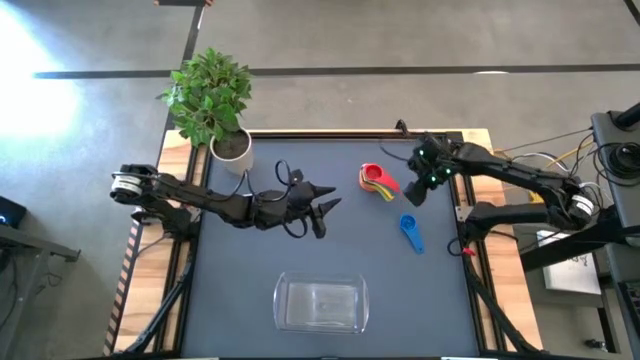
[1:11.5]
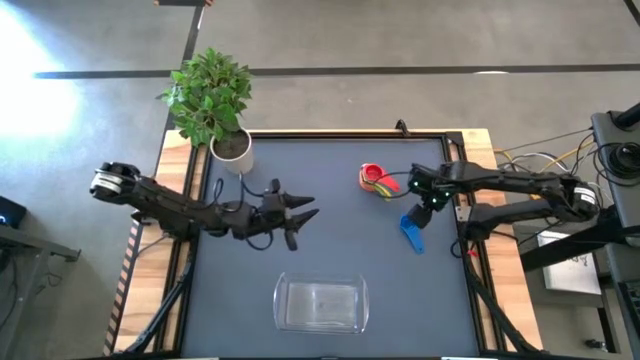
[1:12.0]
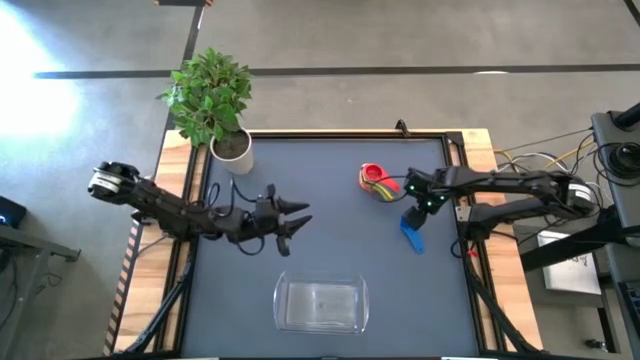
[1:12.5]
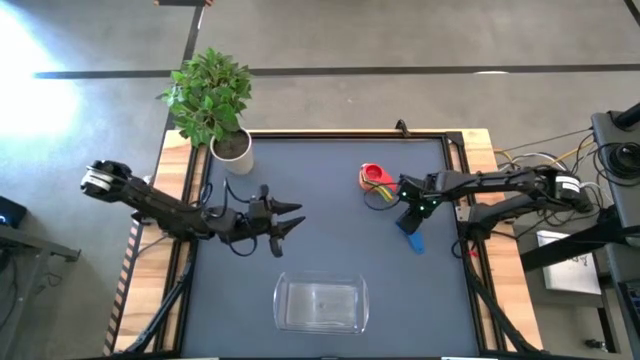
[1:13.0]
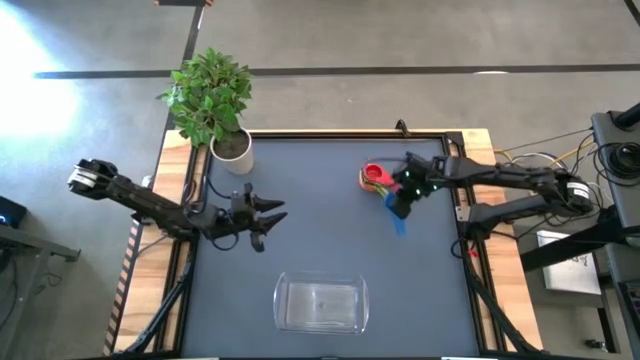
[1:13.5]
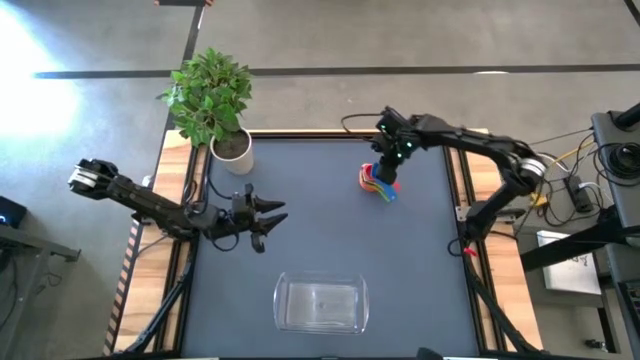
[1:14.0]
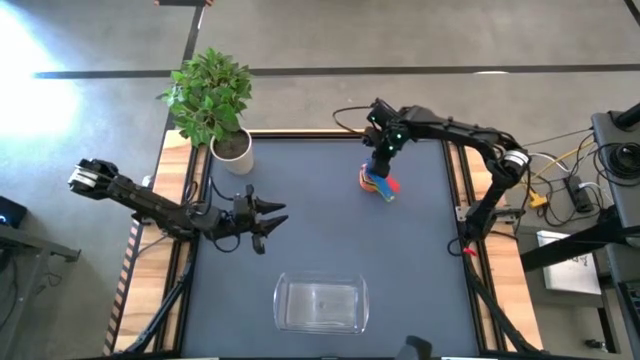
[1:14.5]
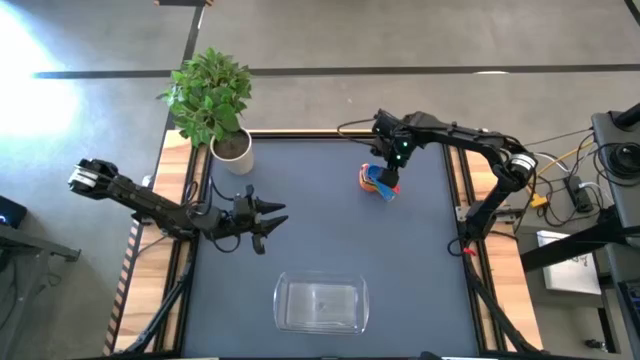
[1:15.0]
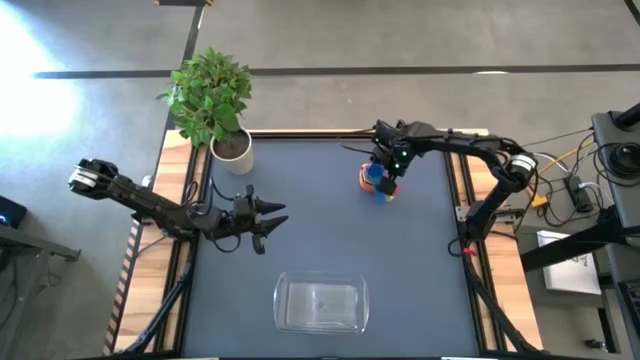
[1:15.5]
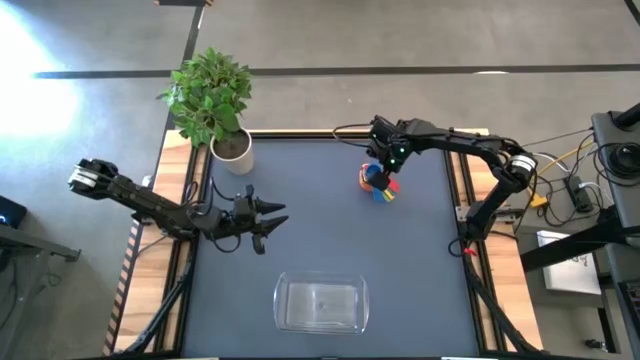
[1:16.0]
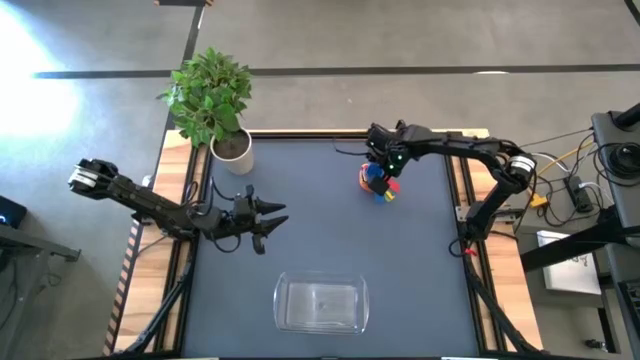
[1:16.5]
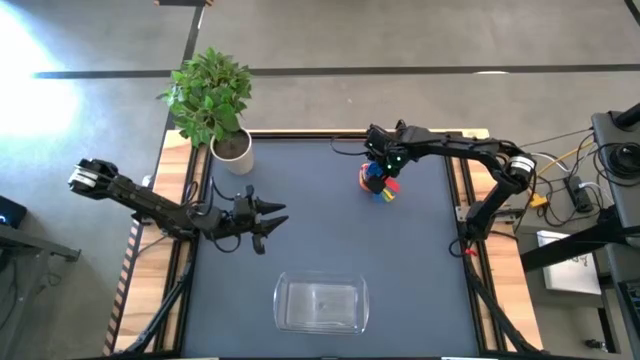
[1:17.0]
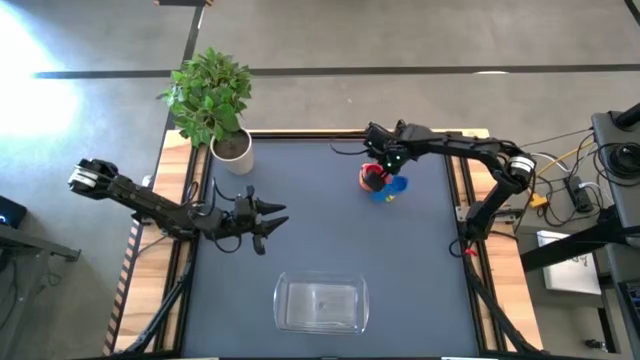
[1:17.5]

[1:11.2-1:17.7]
Task: Nest measuring cups in basket
Stack the blue measuring cup on top of the red measuring cup

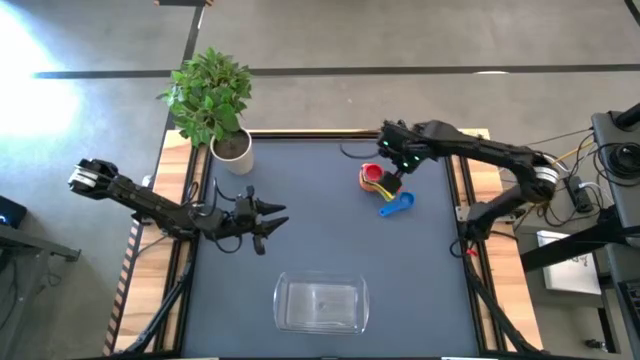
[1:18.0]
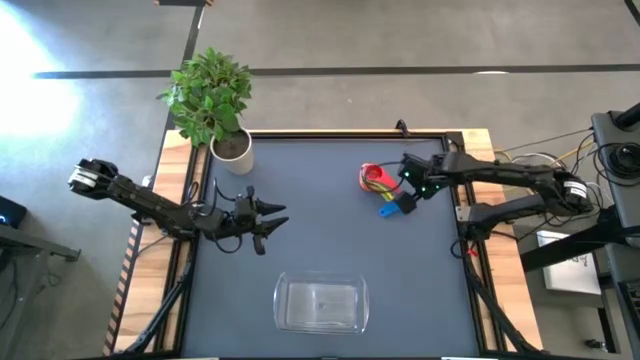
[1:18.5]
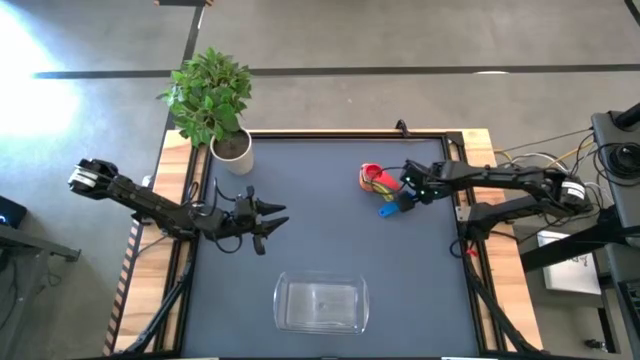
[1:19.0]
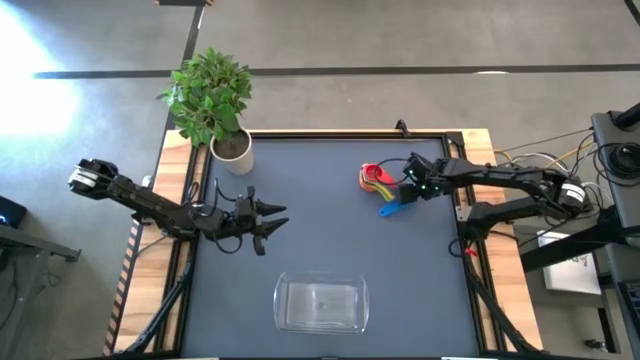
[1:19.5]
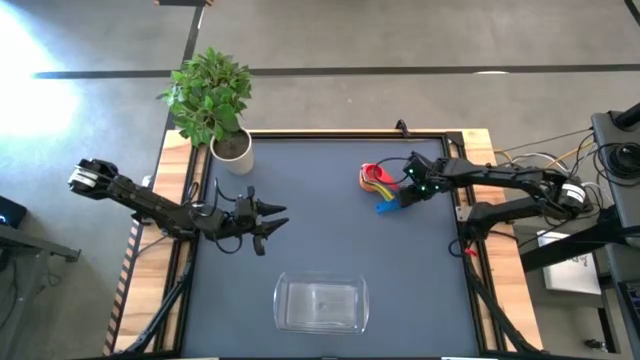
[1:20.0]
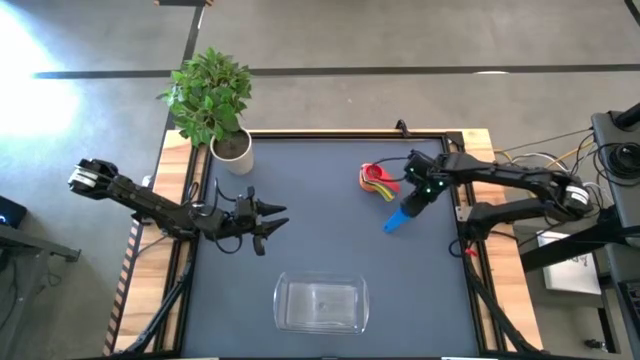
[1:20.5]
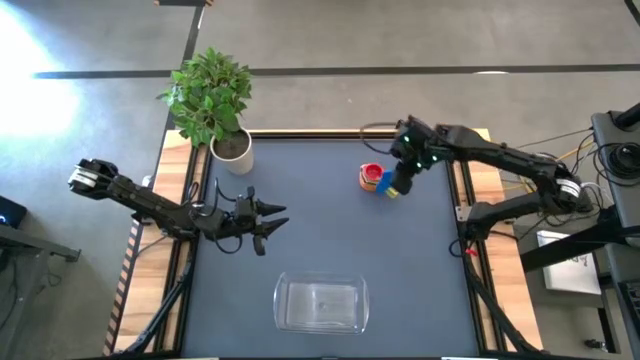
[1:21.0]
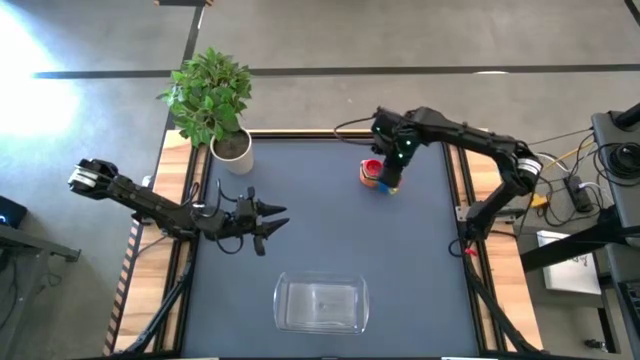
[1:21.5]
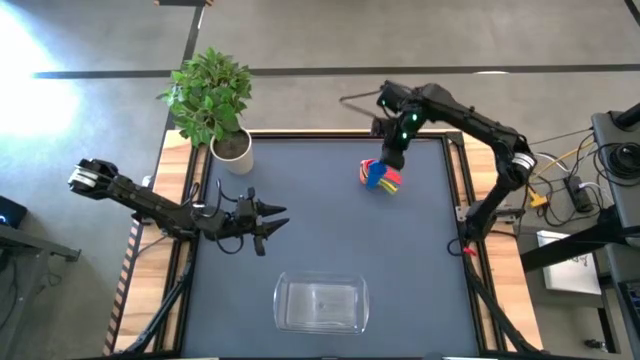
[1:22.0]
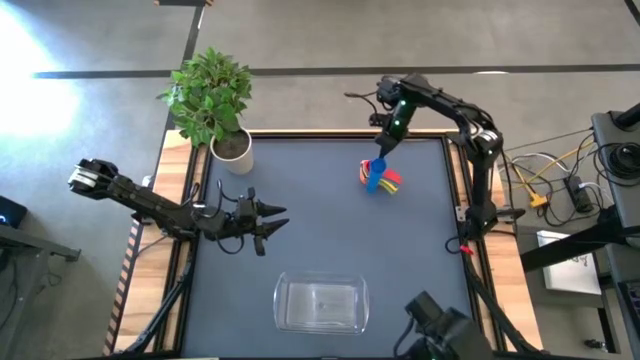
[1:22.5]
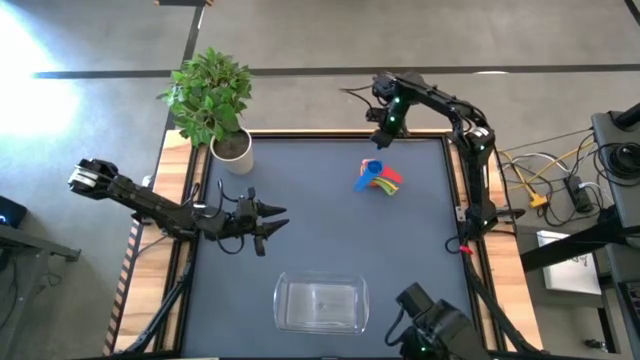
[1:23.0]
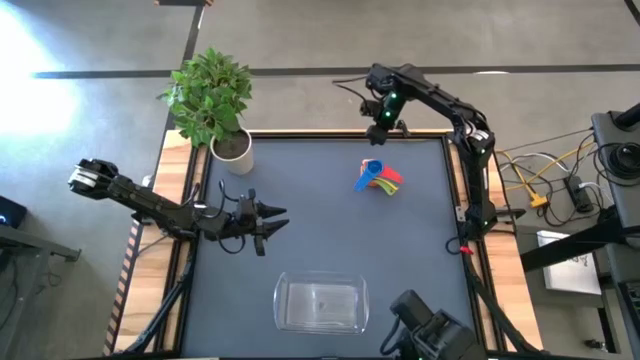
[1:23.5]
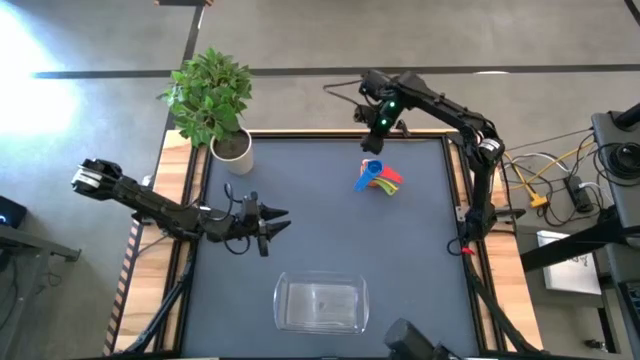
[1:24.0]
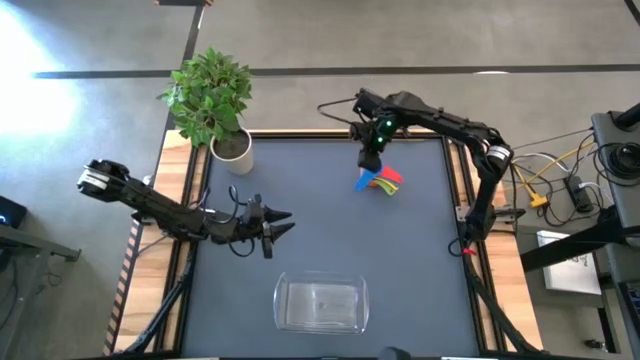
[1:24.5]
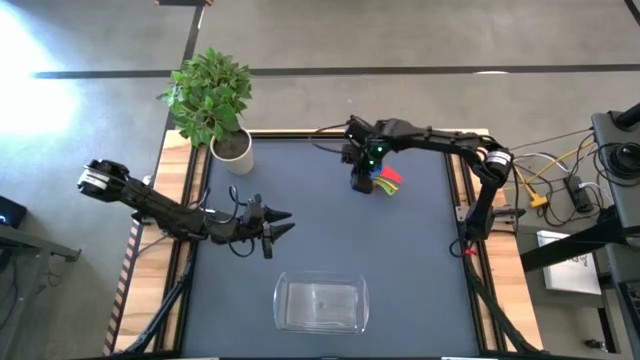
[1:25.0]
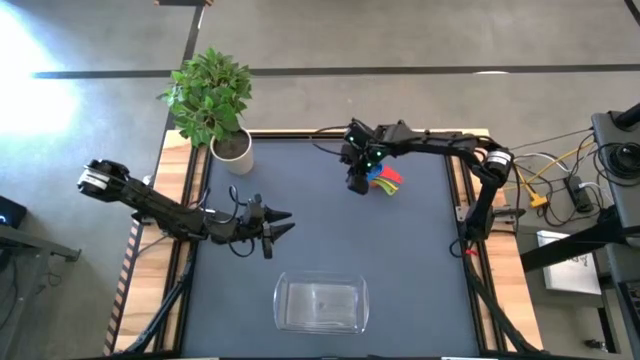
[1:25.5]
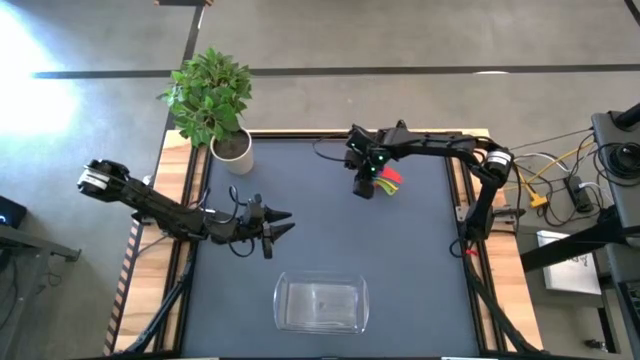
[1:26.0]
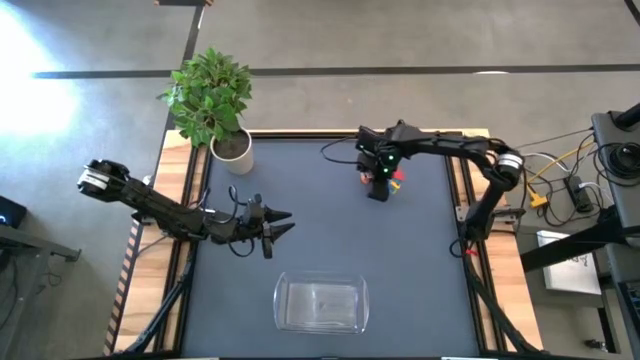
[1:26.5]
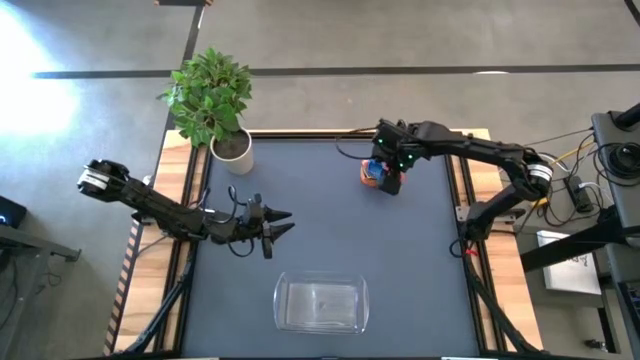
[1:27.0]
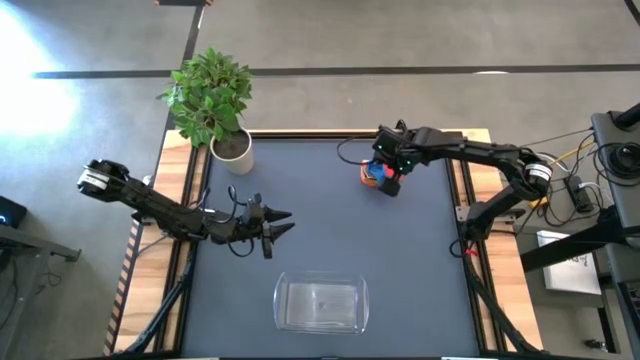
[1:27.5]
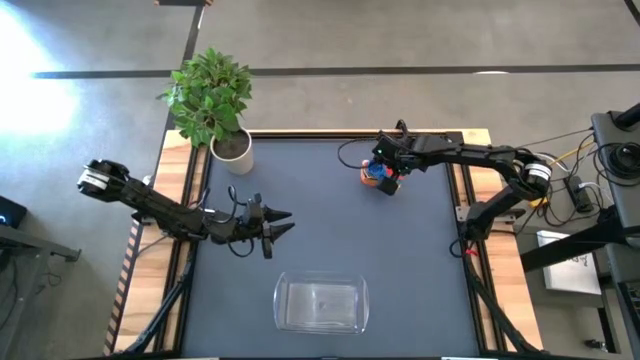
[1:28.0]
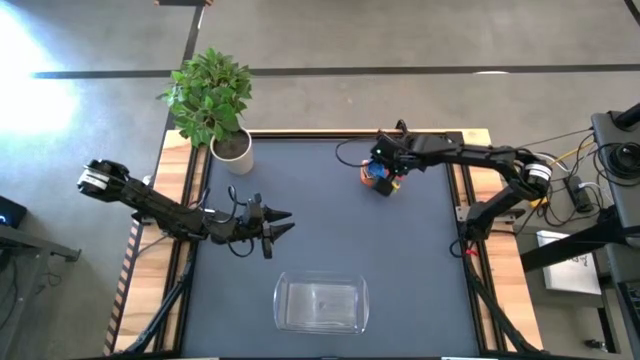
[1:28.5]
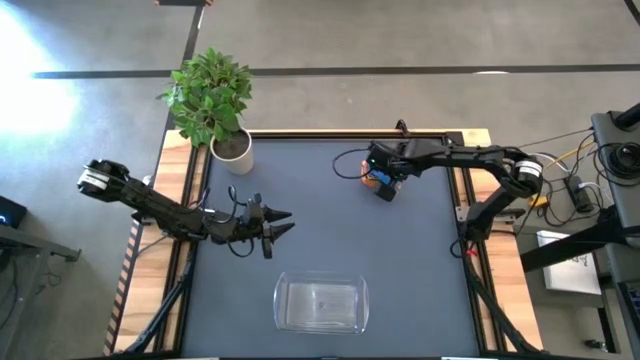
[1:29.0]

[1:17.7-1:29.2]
Stack the blue measuring cup on top of the red measuring cup

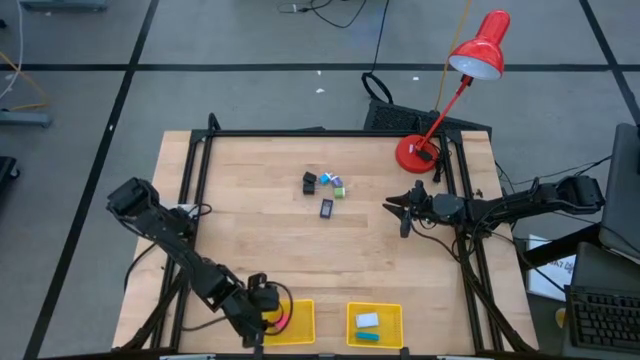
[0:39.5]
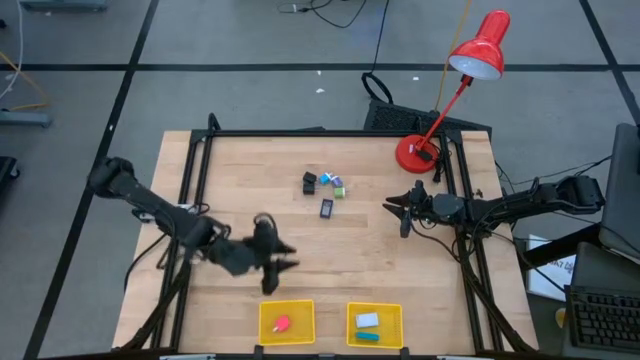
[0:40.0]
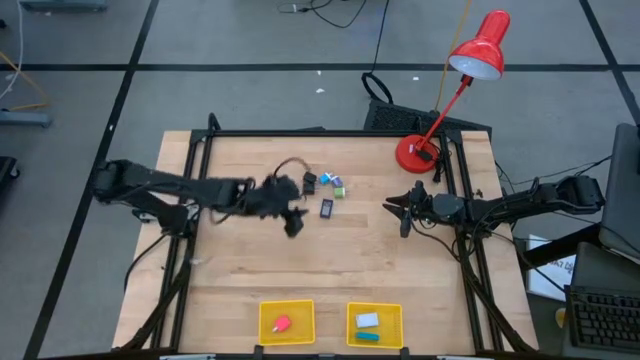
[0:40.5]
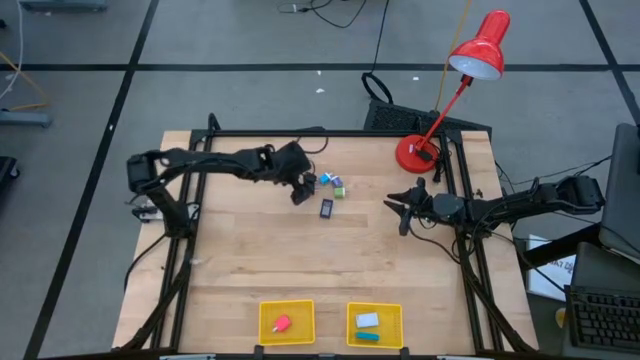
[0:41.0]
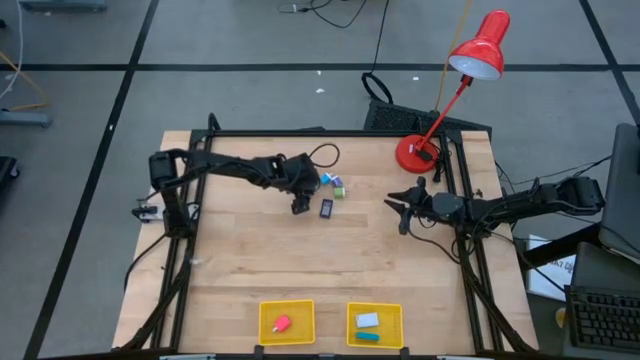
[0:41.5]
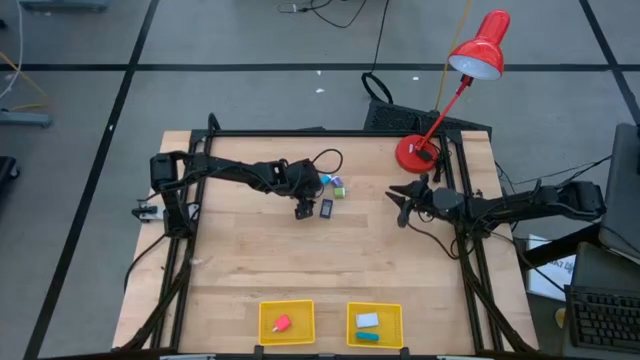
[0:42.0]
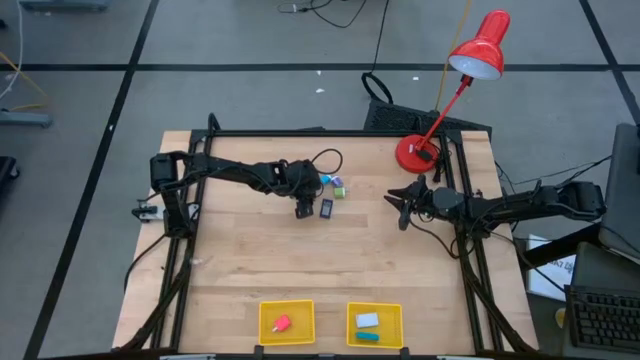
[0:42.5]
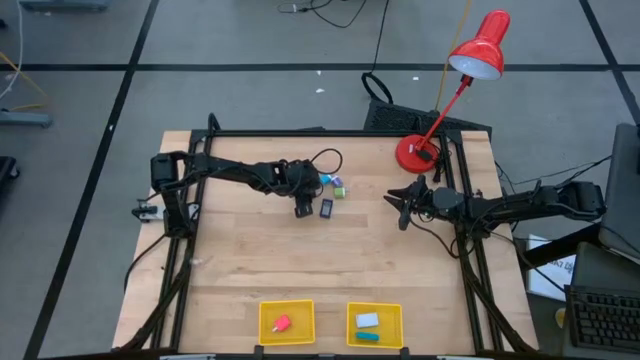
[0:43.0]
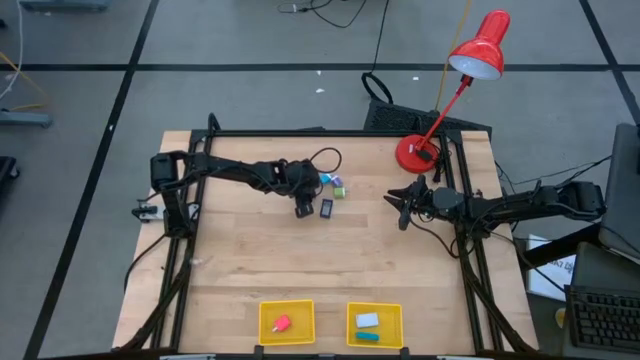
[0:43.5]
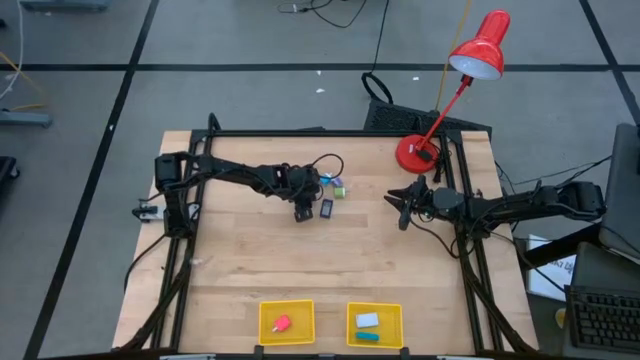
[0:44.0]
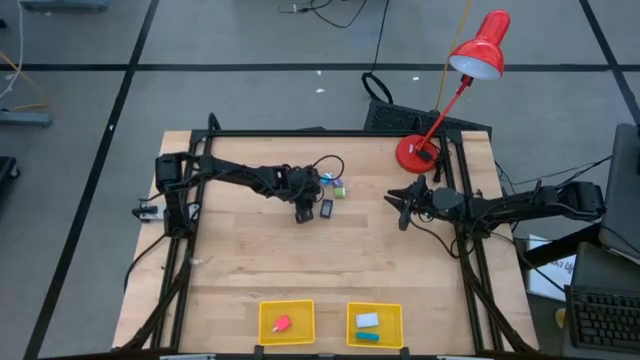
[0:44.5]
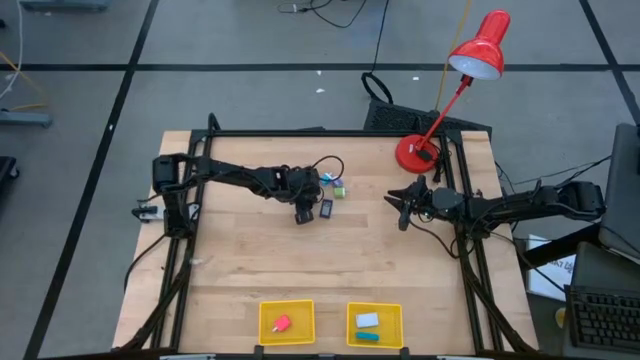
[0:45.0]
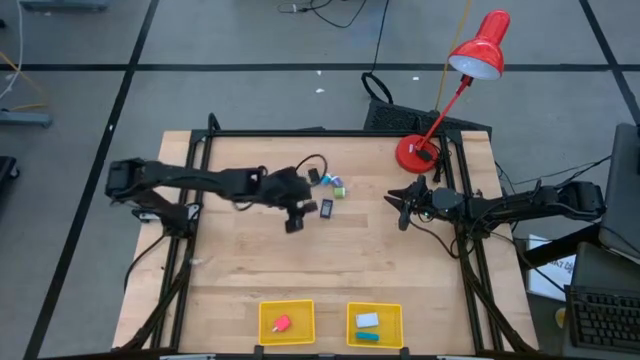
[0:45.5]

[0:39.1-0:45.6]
Task: Pick & Place Office items
Put the bottom black adapter into the left yellow bin
